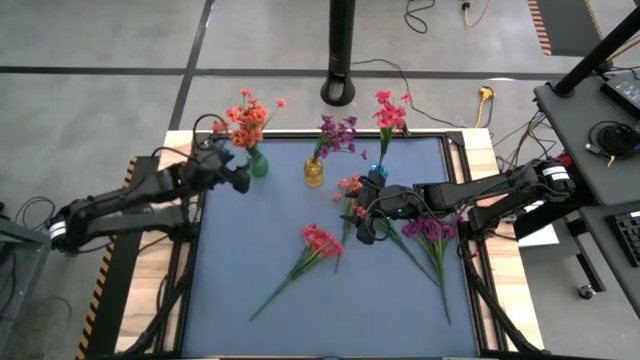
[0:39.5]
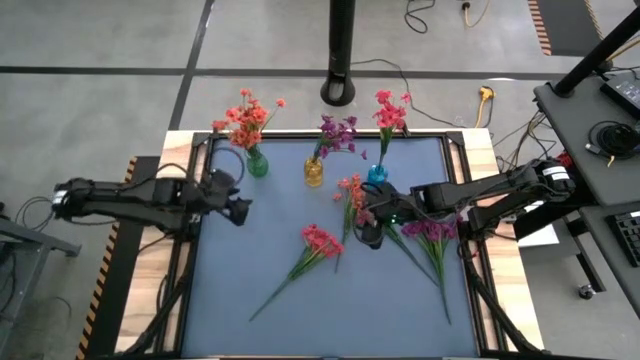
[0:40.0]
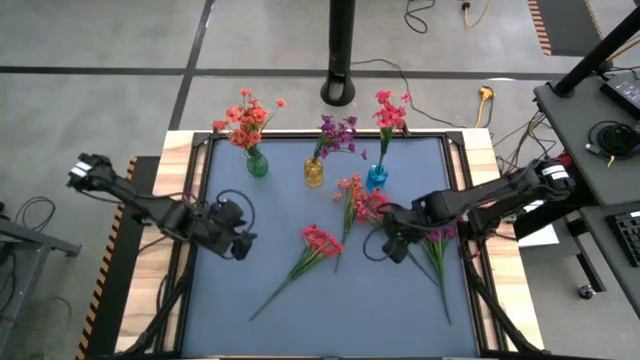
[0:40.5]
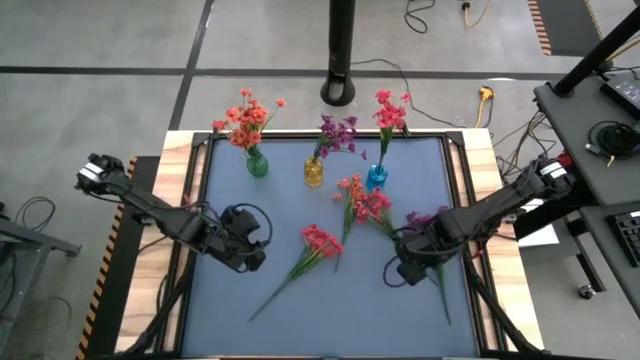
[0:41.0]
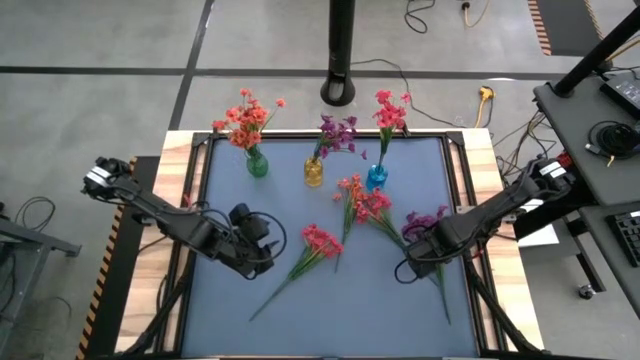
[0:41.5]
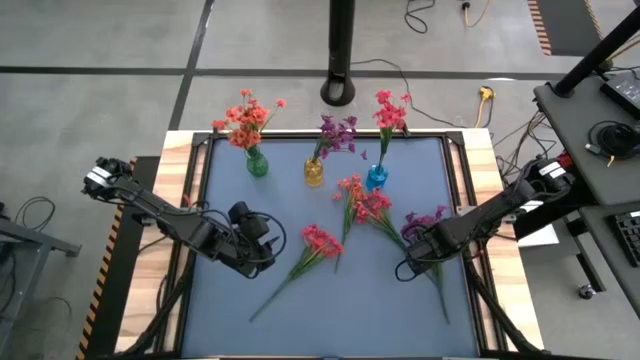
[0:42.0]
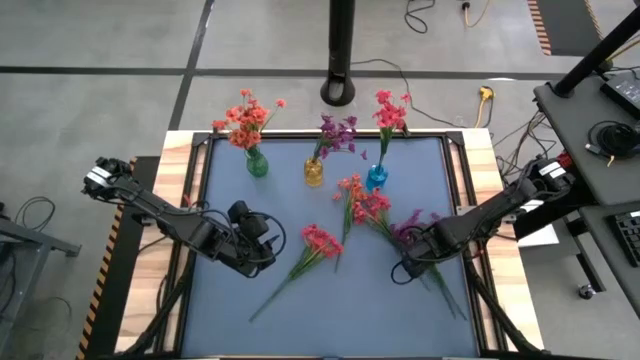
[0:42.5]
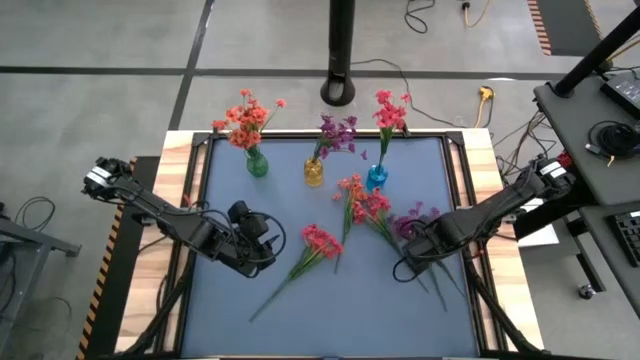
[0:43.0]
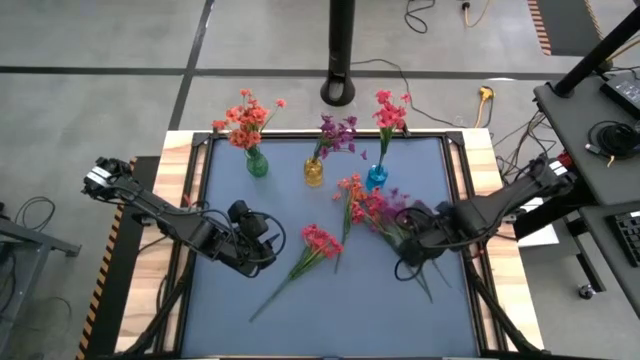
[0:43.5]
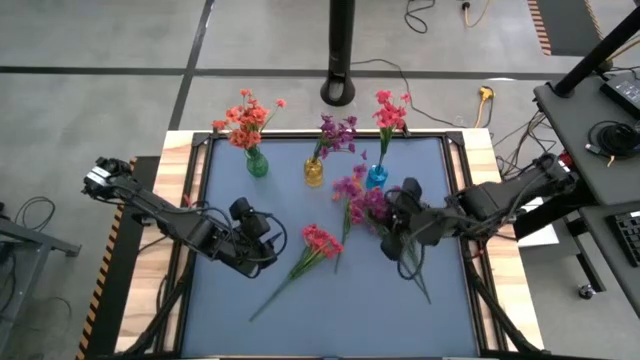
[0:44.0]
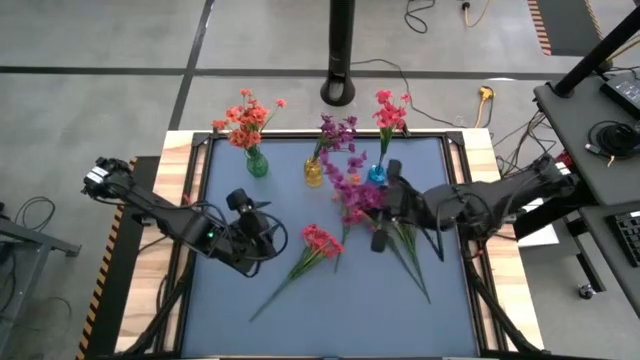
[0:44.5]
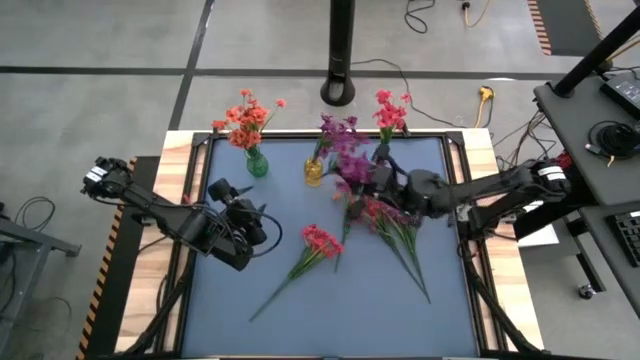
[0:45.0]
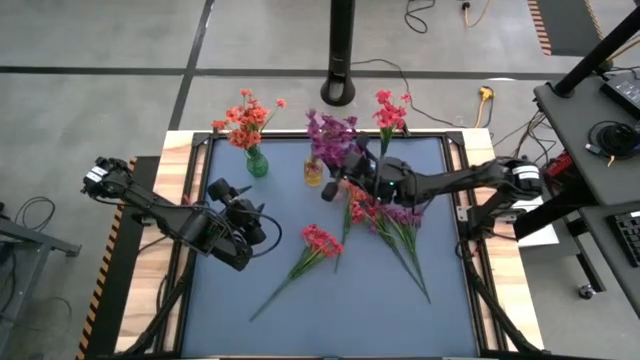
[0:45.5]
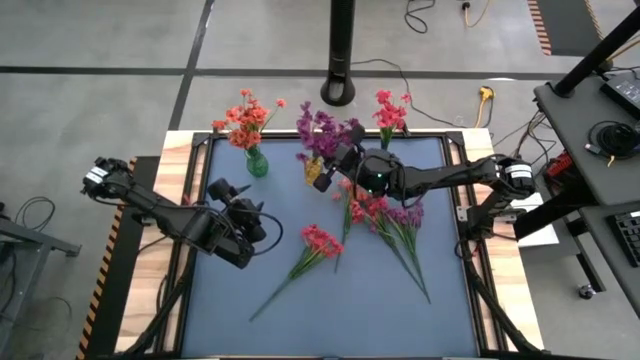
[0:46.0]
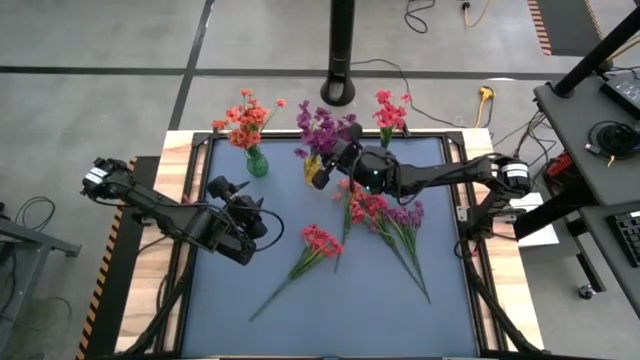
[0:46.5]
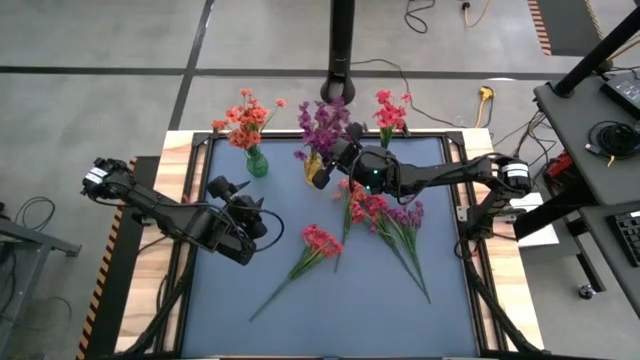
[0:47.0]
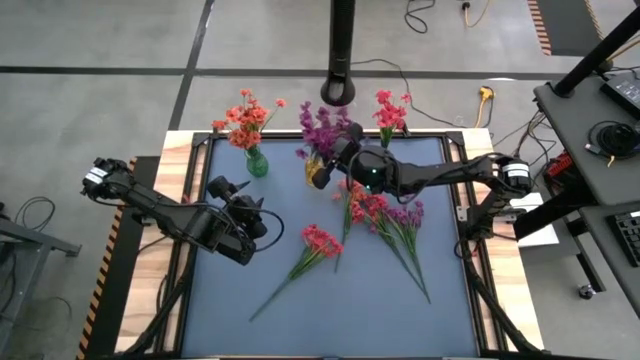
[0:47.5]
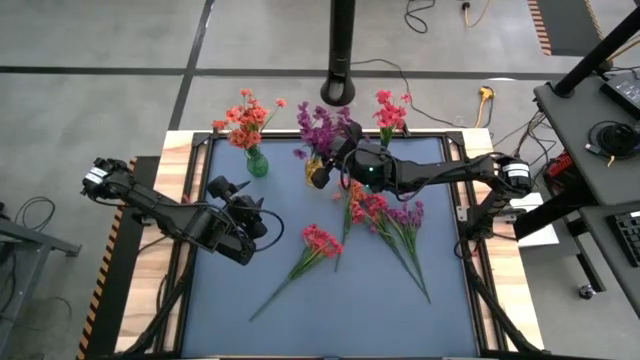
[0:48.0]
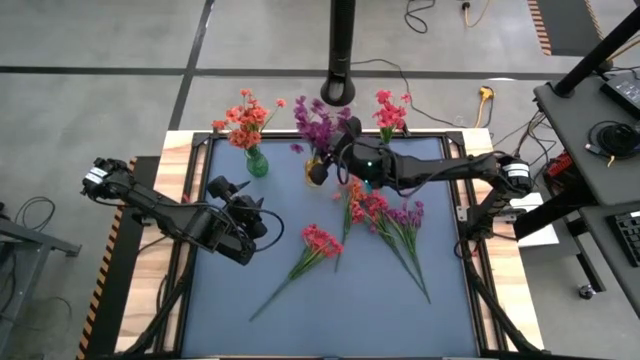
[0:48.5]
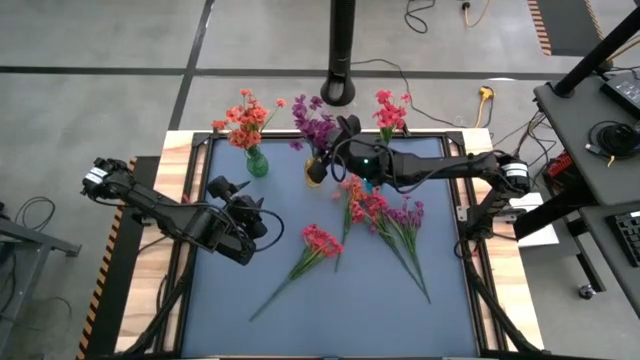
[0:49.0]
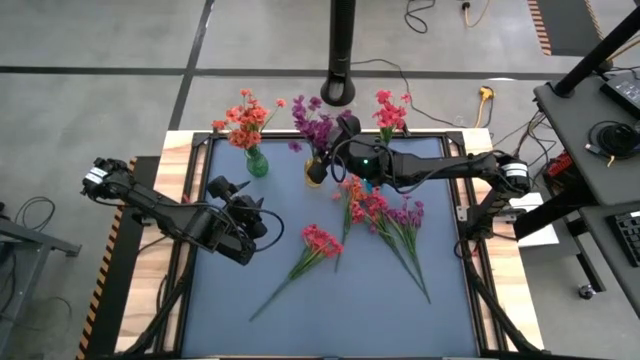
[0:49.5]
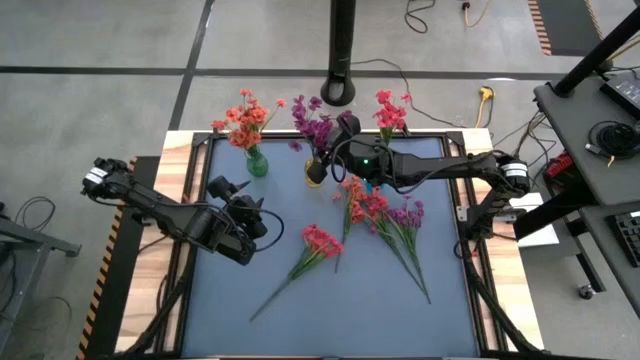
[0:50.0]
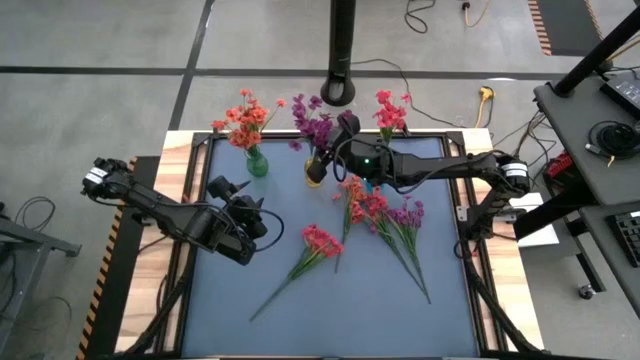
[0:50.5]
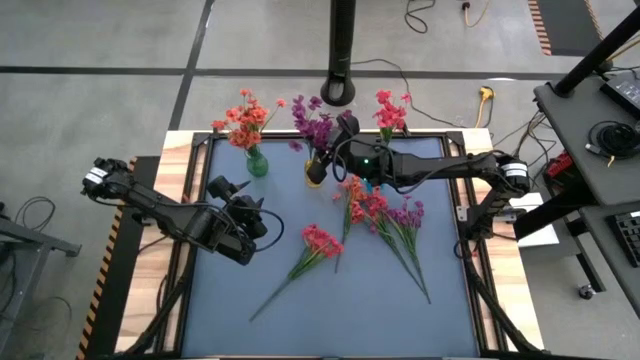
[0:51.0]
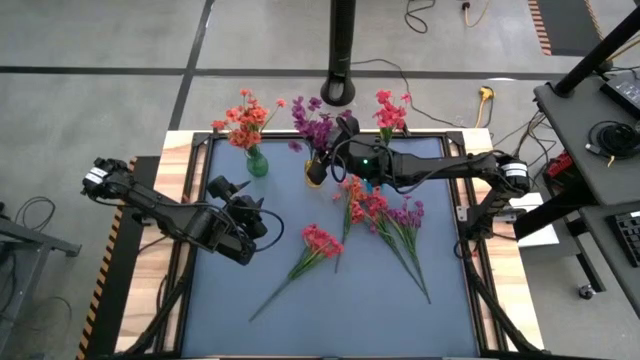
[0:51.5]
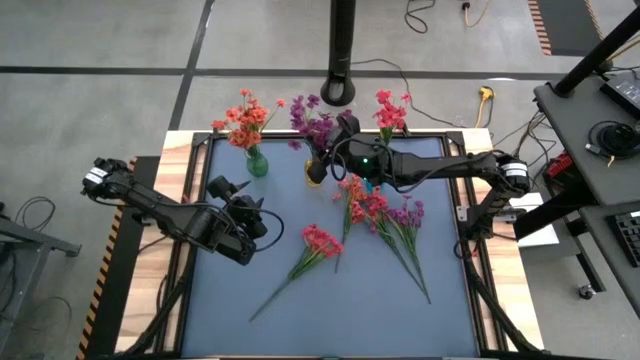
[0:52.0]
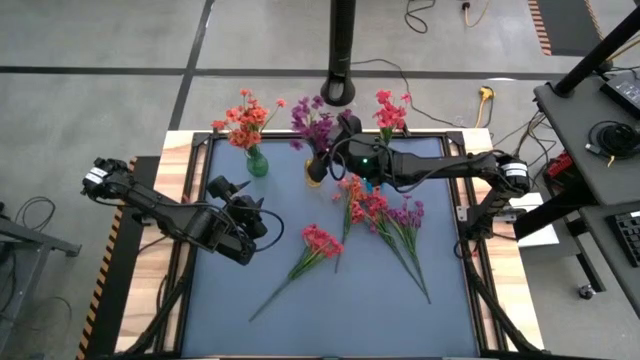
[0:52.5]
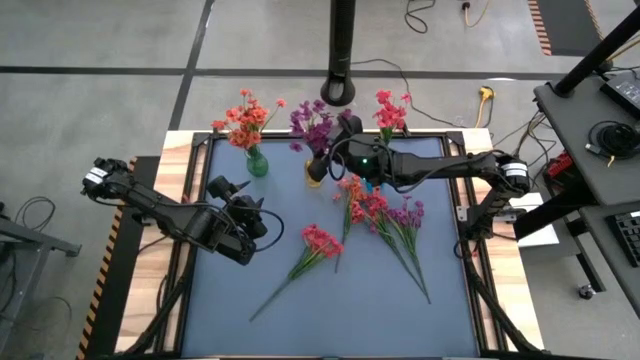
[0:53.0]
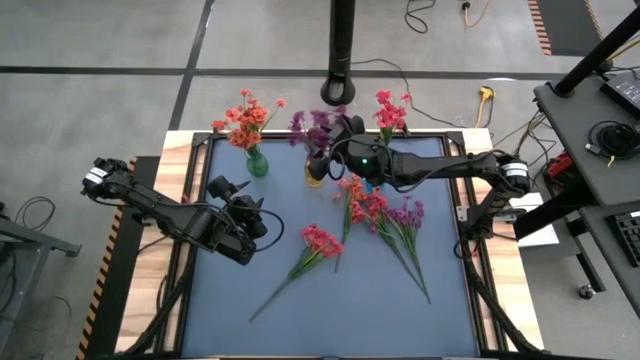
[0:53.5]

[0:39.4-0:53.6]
Task: Sort flowers into vase by color
Put the right violet flowers into the yellow vase

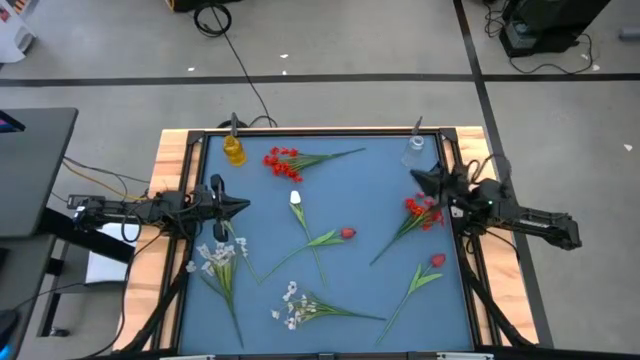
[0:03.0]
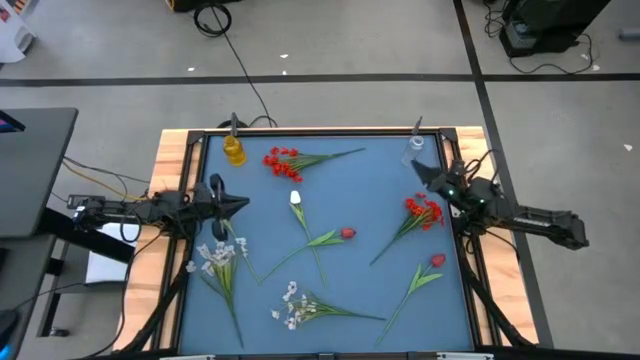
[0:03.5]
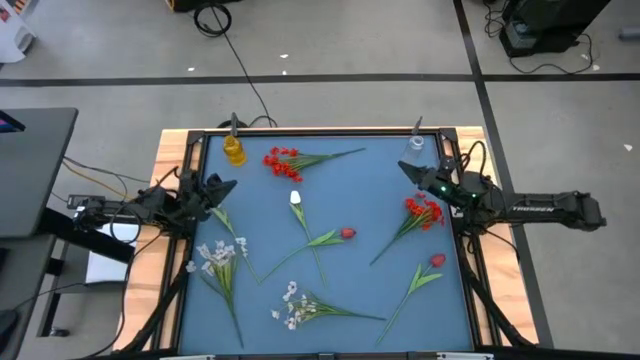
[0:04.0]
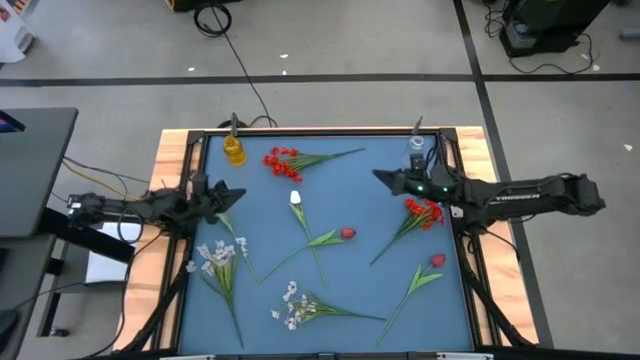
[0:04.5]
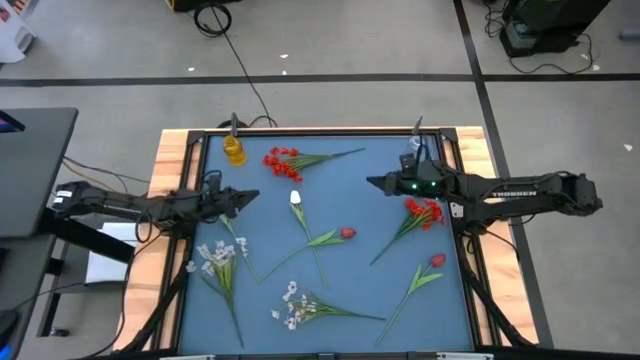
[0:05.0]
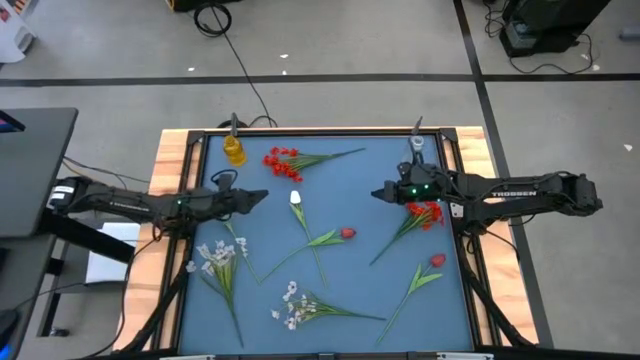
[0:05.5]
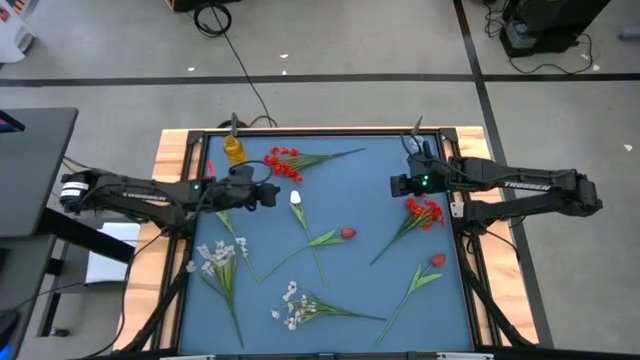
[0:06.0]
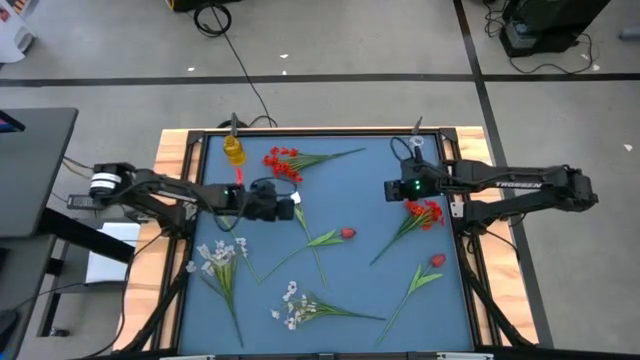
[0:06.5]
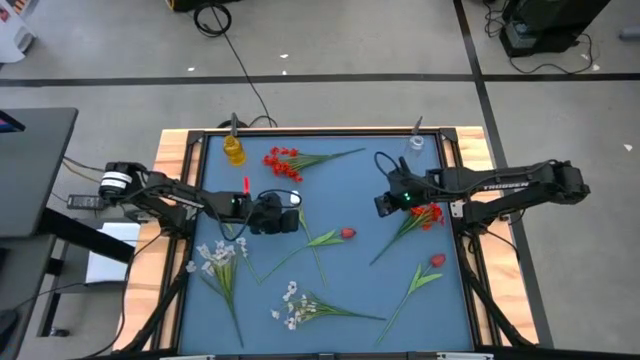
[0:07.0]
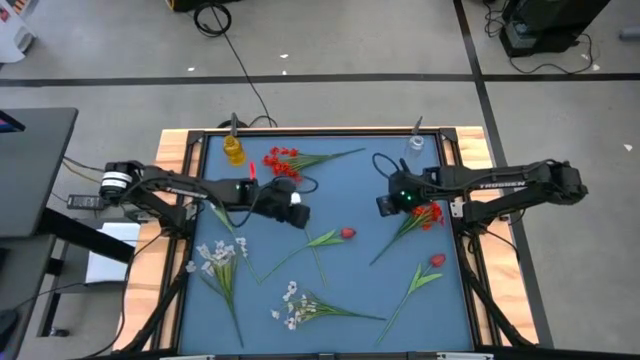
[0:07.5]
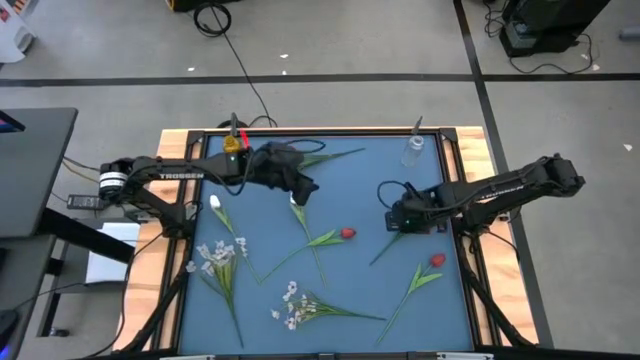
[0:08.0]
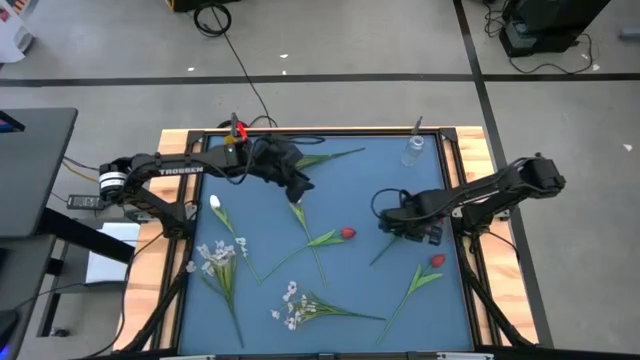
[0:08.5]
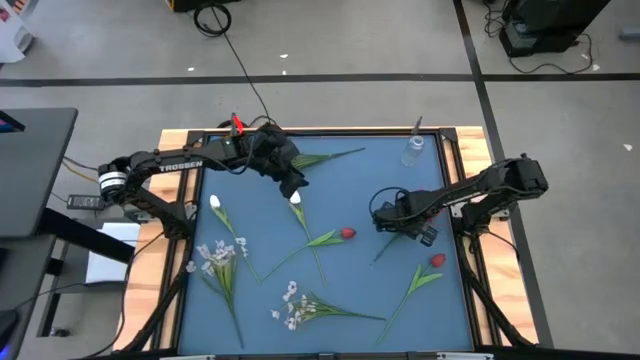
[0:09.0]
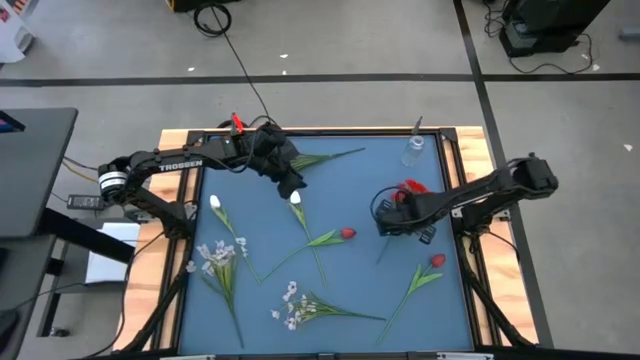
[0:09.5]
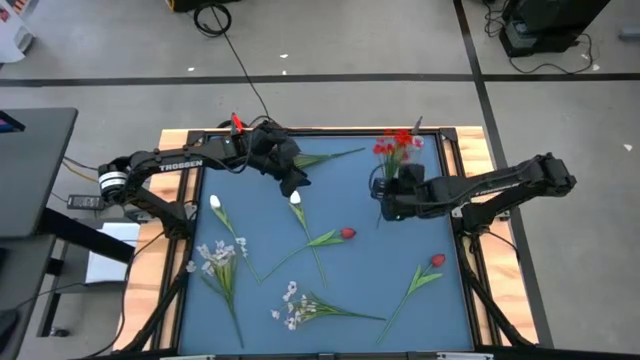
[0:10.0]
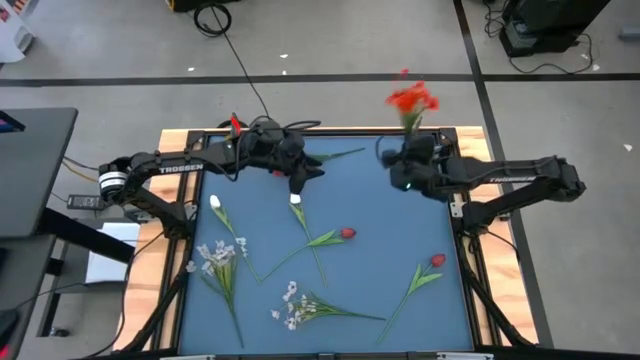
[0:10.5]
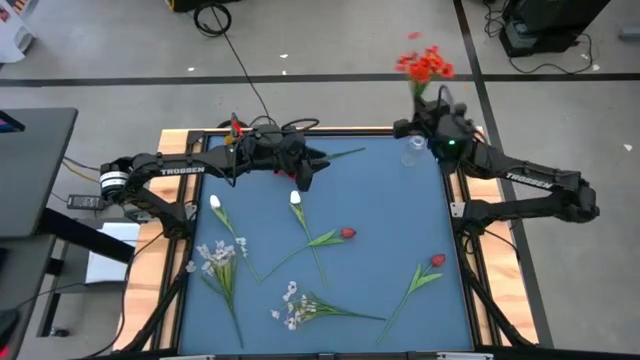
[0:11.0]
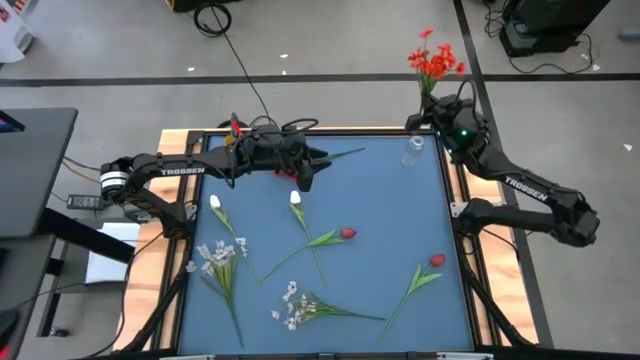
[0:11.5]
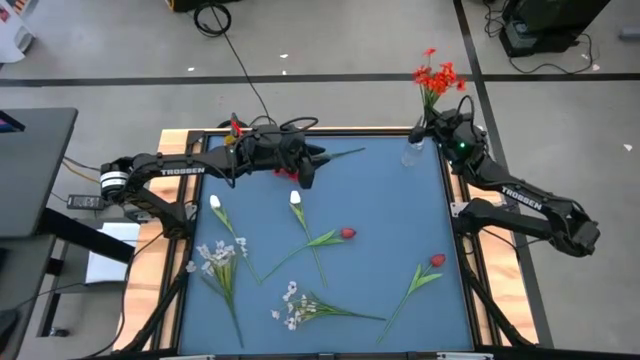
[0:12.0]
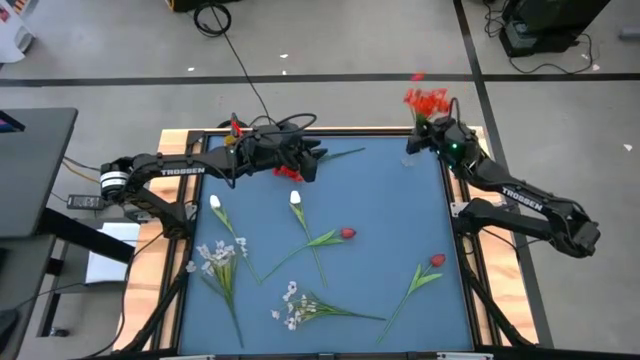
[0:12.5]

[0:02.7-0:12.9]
Task: Sort flowers into vase by color
Put the bottom orange flowers into the transparent vase
